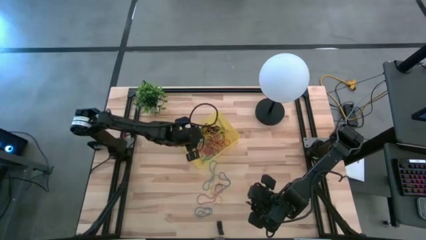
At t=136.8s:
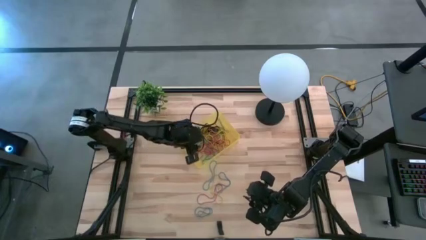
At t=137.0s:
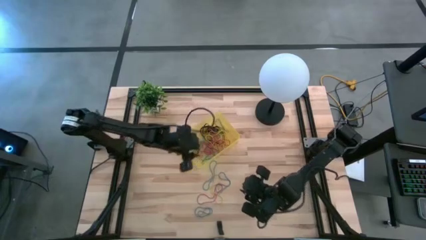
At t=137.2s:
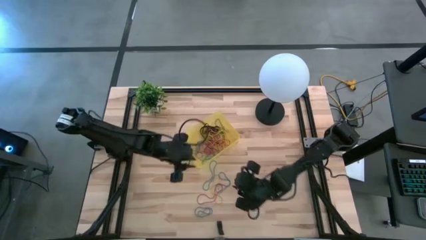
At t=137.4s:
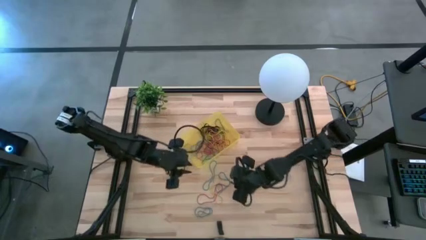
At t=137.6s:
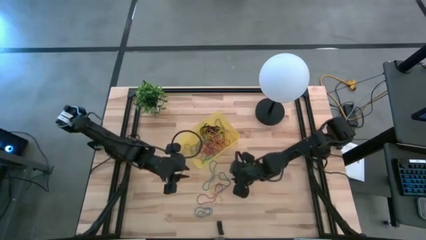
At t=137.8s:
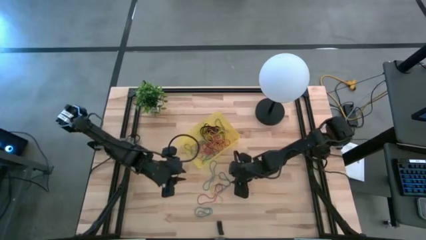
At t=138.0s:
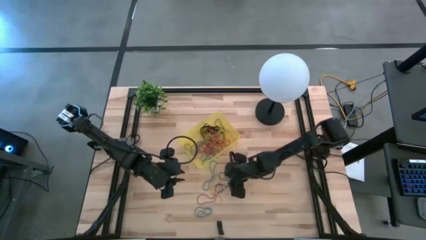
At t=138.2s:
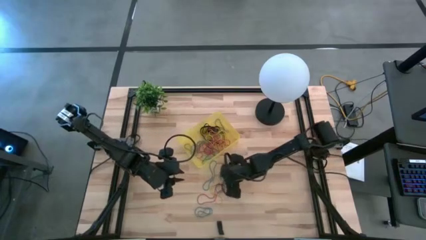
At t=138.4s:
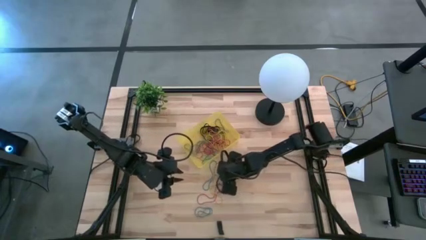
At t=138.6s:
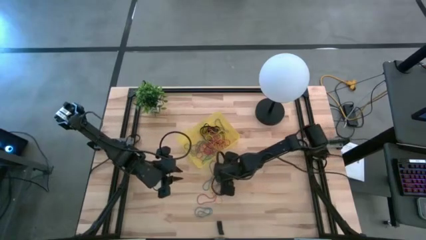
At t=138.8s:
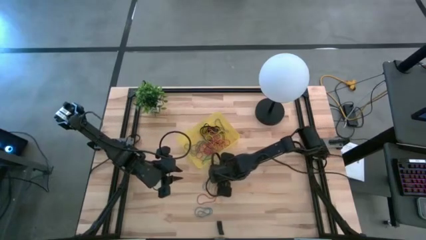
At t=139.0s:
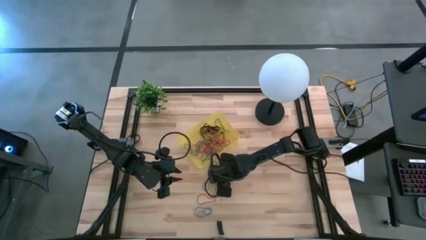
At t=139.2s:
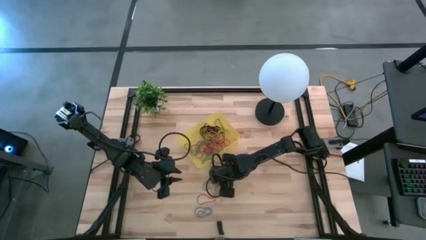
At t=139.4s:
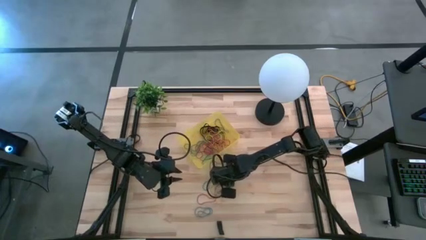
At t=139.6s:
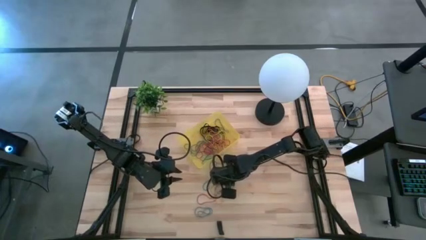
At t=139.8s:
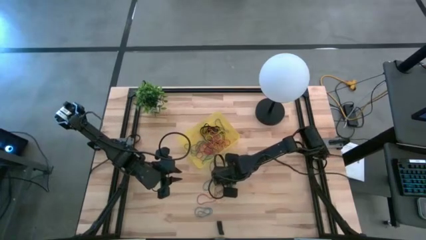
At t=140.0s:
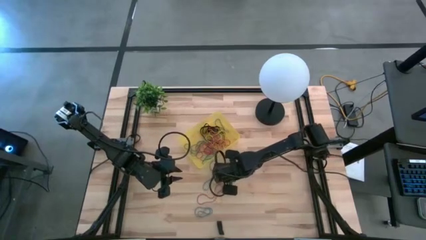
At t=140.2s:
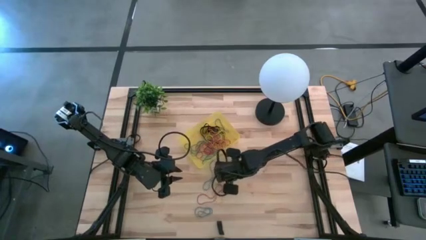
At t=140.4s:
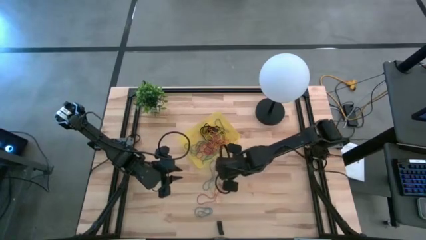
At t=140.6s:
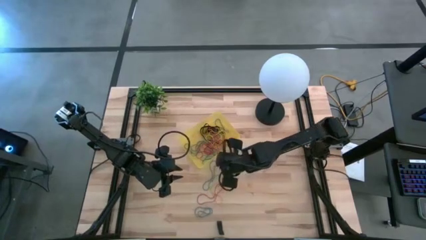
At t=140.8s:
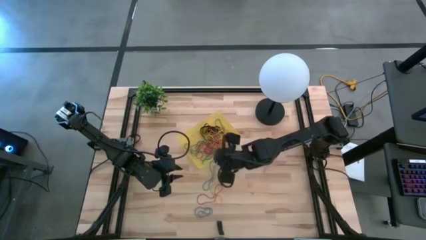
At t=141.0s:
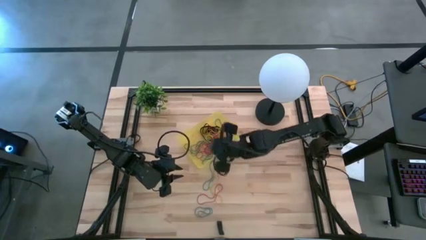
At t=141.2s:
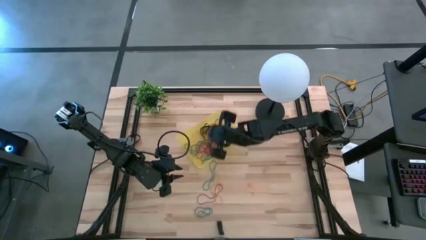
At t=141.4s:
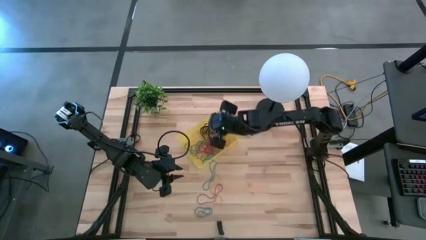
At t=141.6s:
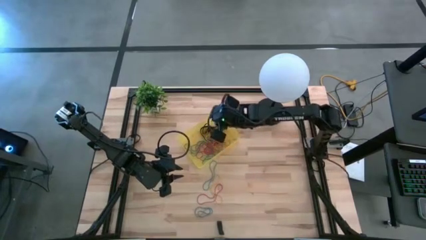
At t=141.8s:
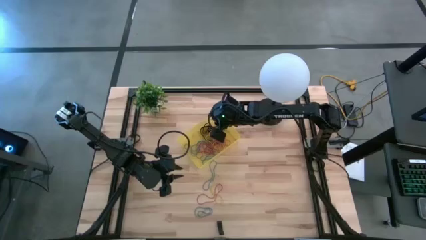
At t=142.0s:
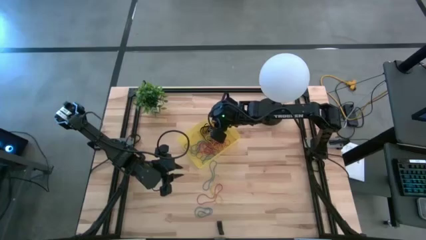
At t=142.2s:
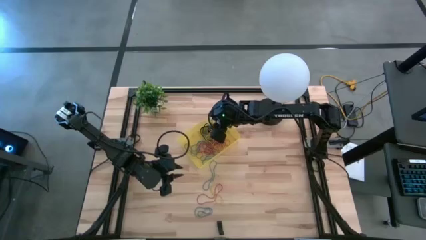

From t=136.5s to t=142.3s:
Task: Pick and place rubber bands into bin
Put the blue rubber band into the yellow bin

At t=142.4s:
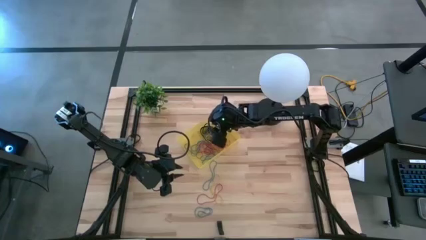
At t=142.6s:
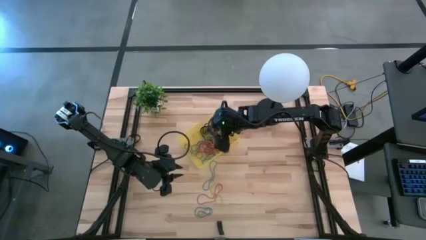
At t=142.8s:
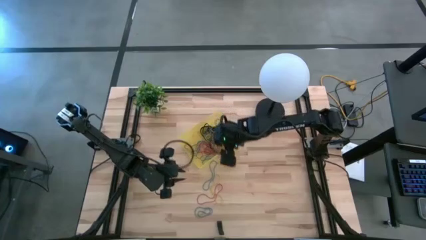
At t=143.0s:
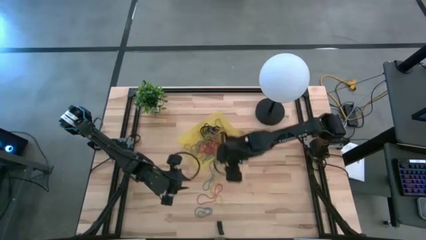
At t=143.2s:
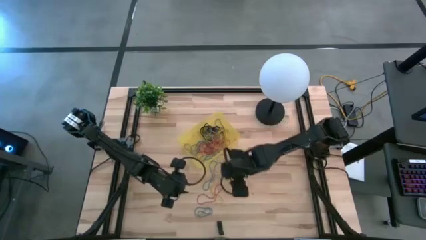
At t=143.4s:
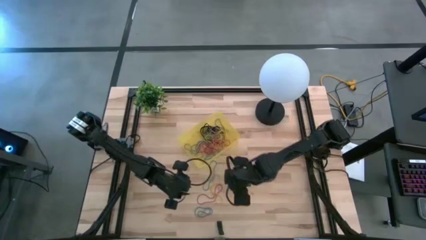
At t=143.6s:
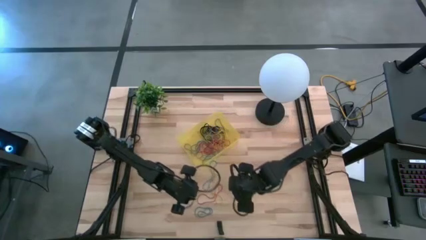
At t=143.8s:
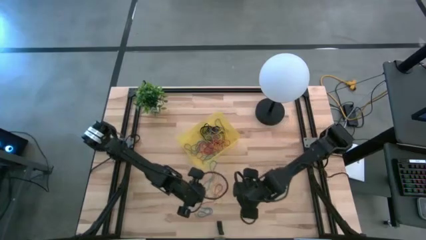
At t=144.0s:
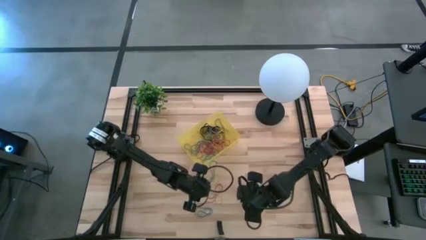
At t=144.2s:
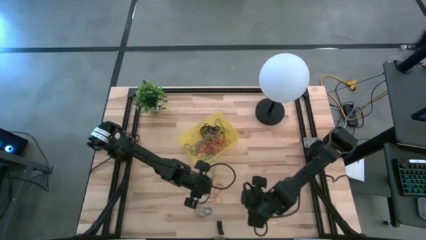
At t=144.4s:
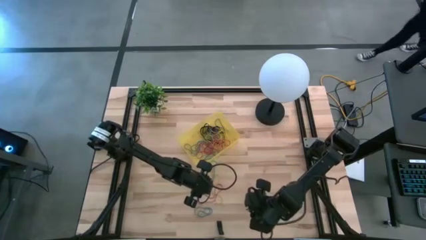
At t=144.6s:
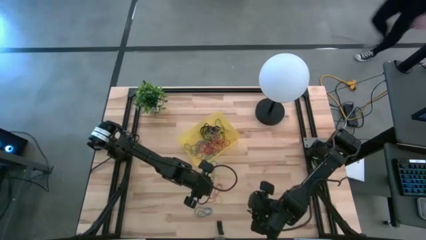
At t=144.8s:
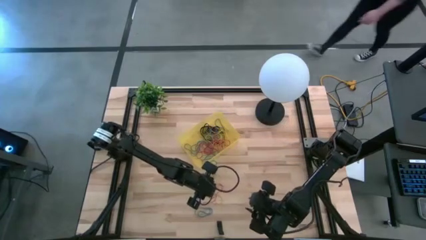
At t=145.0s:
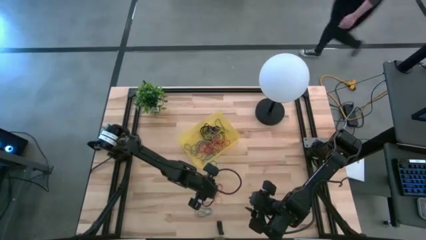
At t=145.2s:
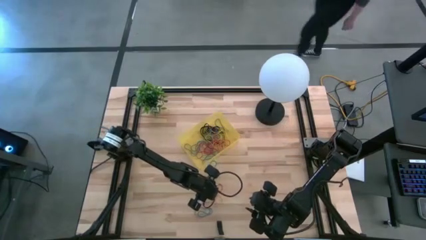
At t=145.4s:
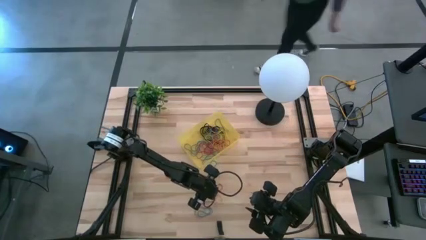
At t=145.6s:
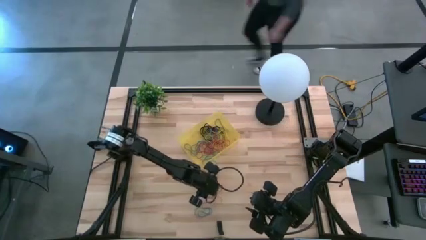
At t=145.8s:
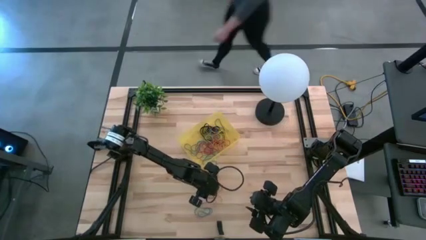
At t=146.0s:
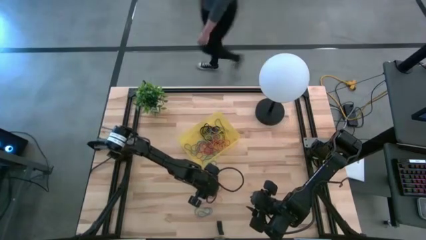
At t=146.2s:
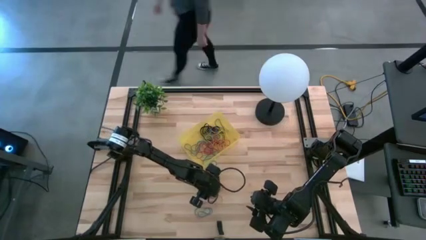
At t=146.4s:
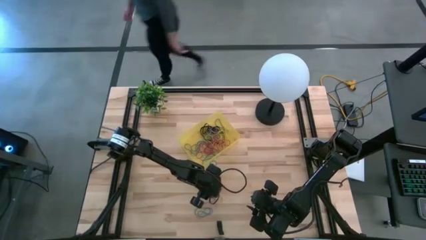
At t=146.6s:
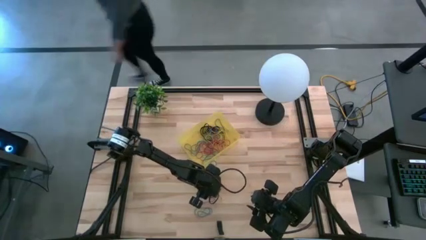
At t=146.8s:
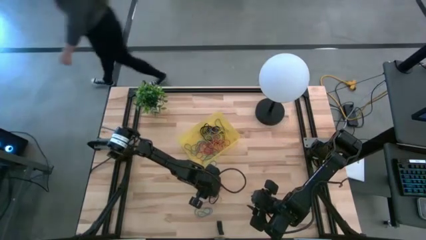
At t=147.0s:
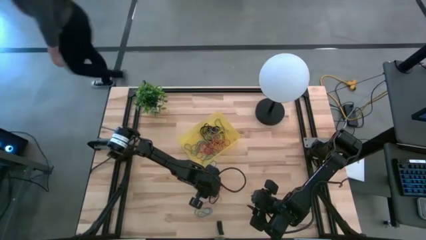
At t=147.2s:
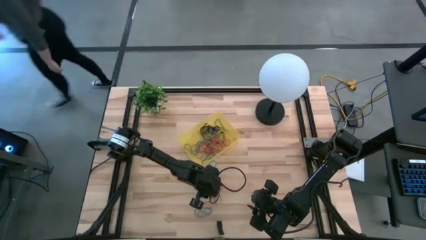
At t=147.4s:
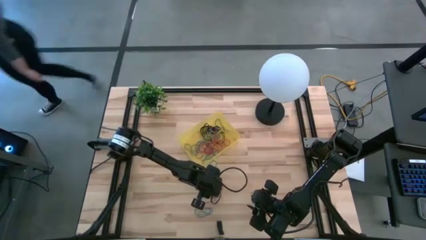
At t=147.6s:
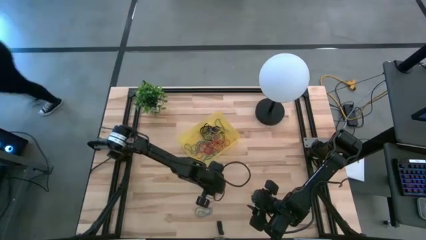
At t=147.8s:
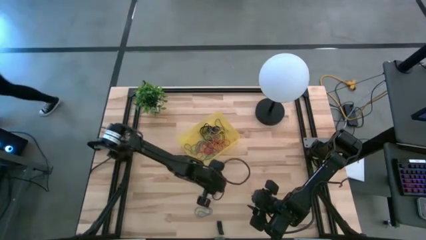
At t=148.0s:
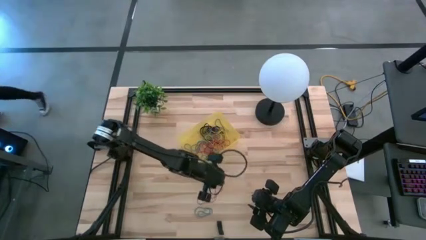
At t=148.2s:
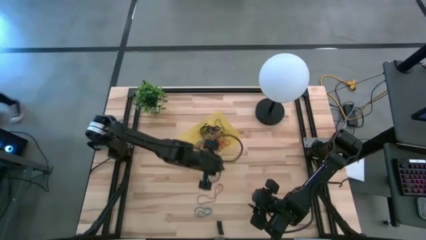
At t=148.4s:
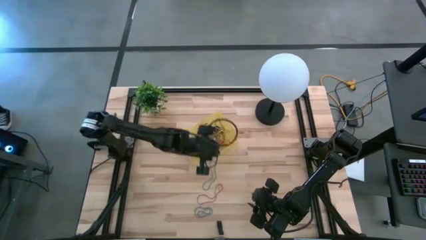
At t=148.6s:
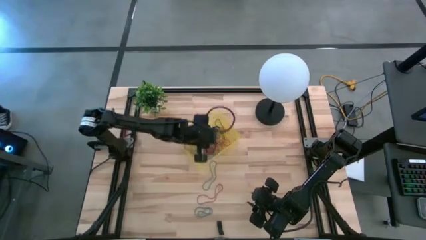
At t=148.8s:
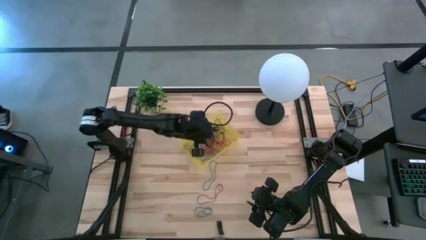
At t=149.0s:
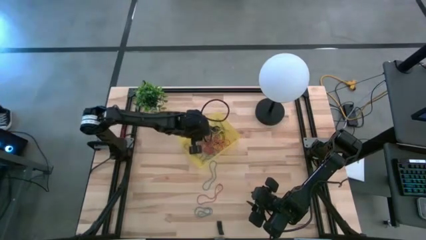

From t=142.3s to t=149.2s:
Put the yellow rubber band into the yellow bin

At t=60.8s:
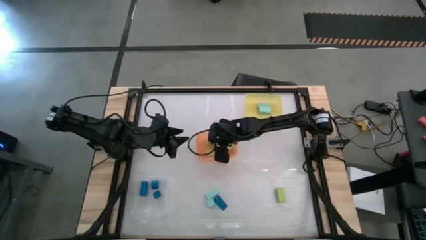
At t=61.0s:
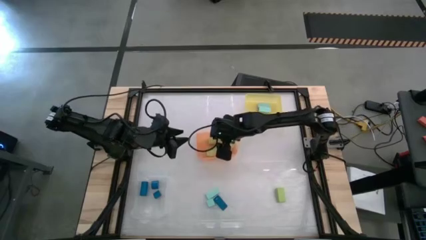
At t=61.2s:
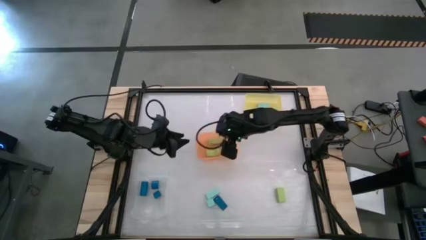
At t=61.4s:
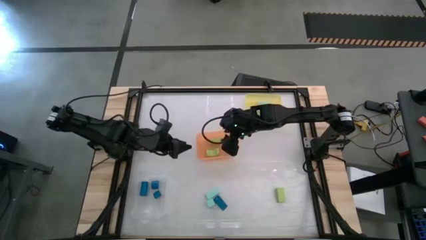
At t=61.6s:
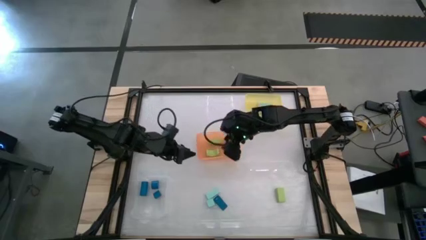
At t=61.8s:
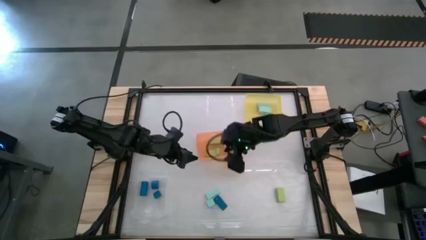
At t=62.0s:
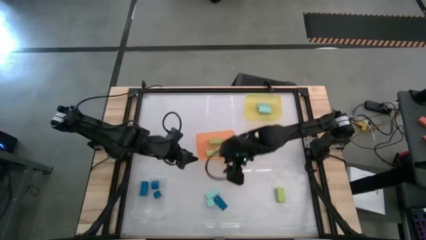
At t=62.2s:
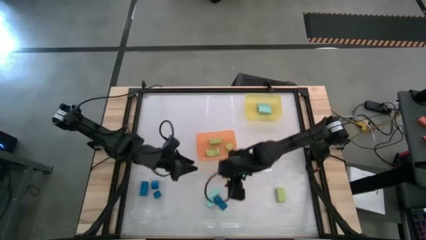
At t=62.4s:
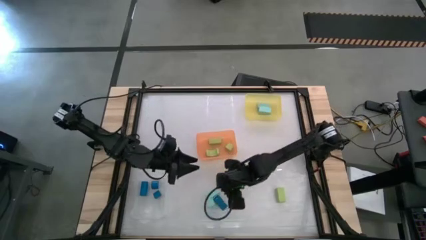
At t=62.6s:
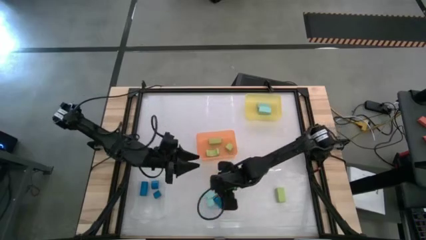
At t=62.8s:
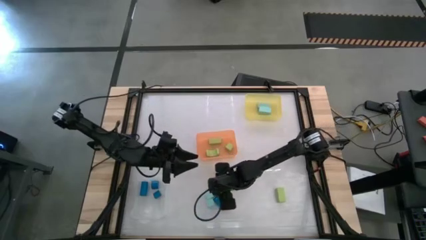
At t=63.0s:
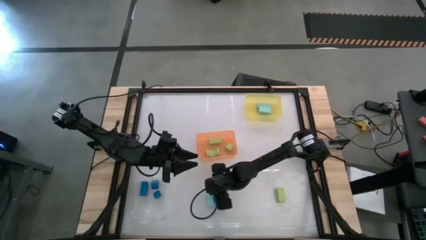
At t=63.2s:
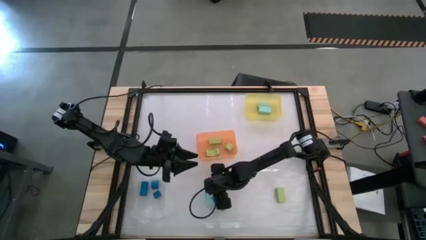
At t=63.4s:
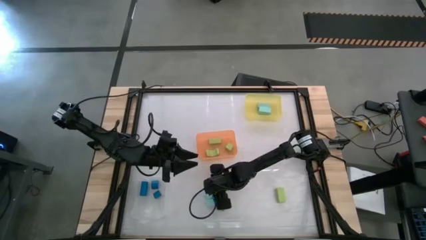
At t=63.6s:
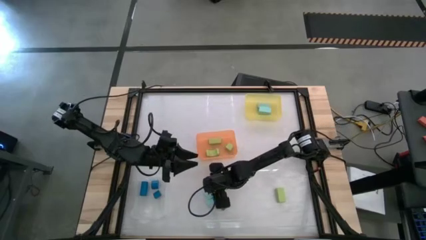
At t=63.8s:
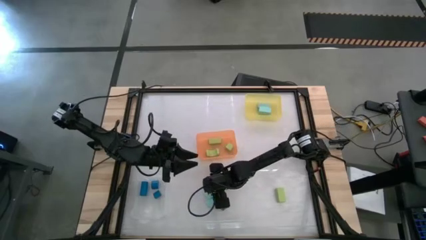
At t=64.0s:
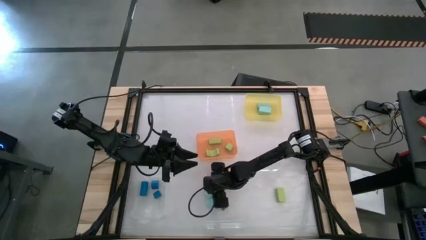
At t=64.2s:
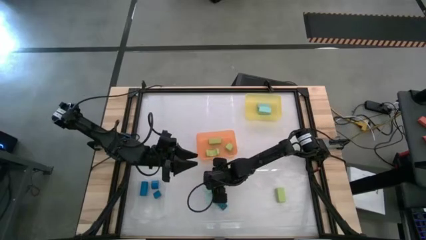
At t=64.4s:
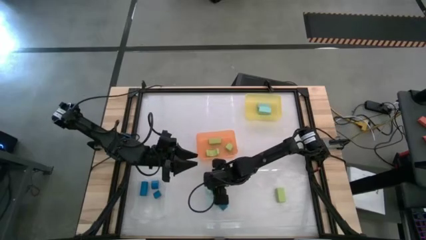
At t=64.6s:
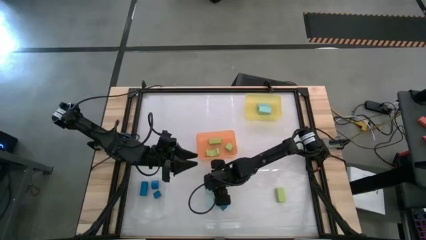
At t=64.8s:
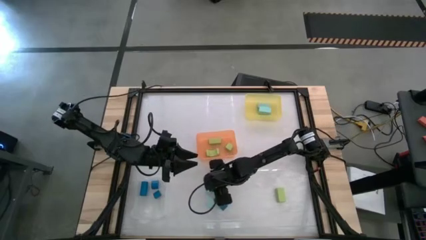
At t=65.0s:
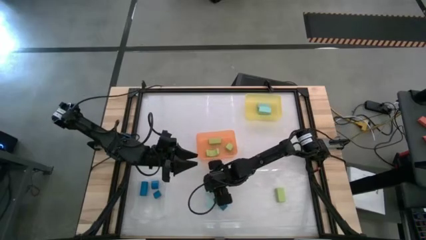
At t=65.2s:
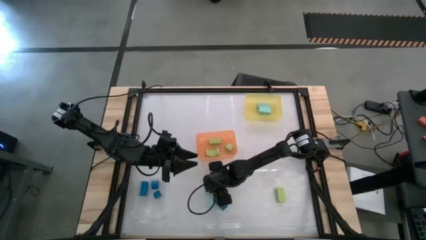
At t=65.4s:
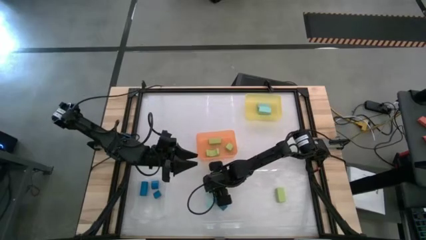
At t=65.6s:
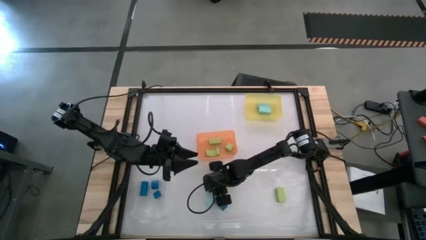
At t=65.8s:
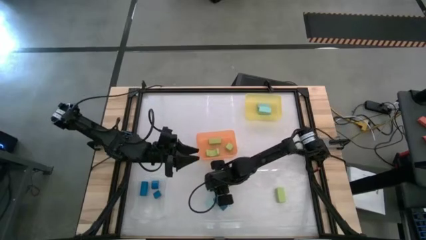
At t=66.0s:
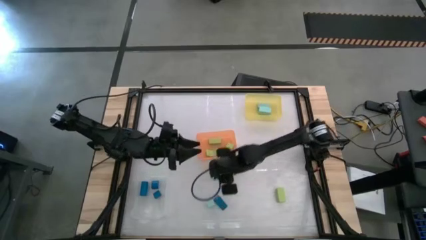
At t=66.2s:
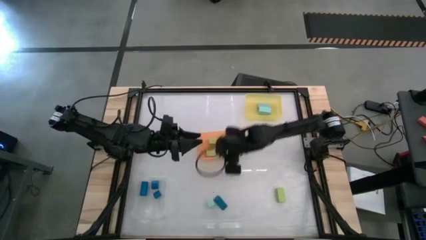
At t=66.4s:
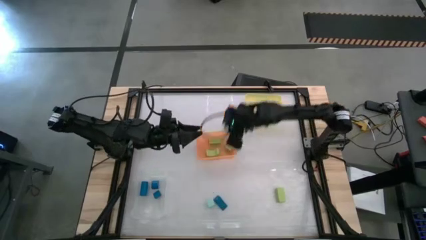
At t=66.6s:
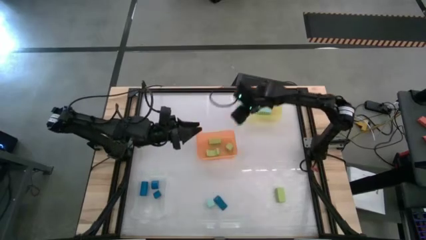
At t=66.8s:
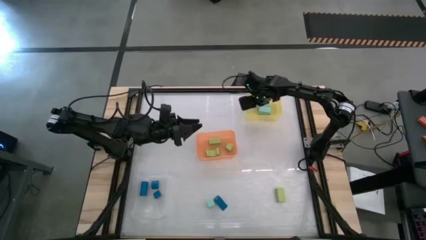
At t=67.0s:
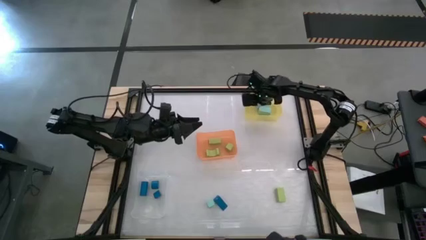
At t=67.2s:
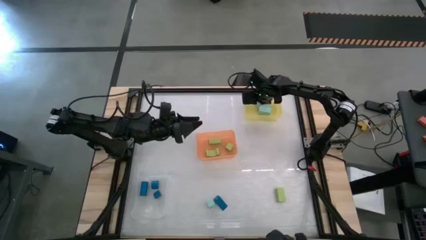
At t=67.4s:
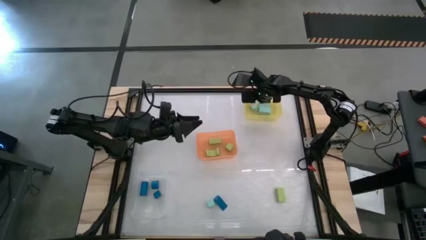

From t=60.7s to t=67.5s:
Task: Sort & place blocks by color
Put the light blue block into the yellow bin
